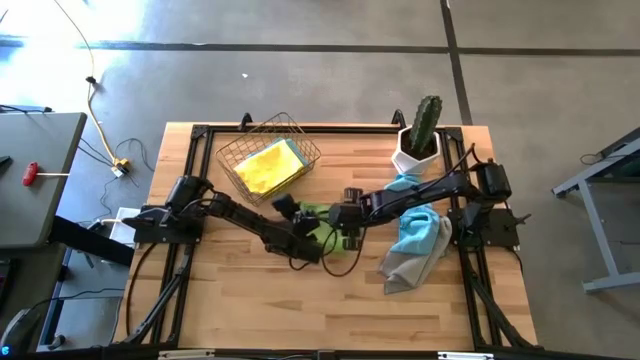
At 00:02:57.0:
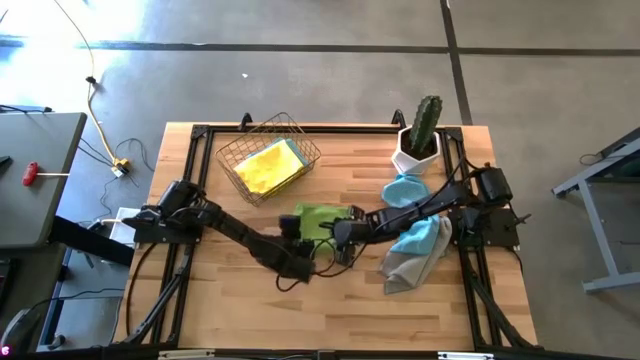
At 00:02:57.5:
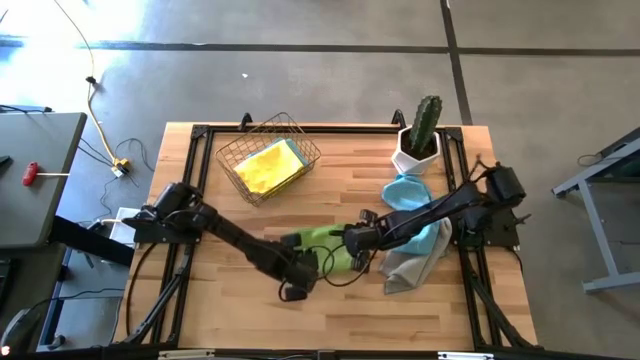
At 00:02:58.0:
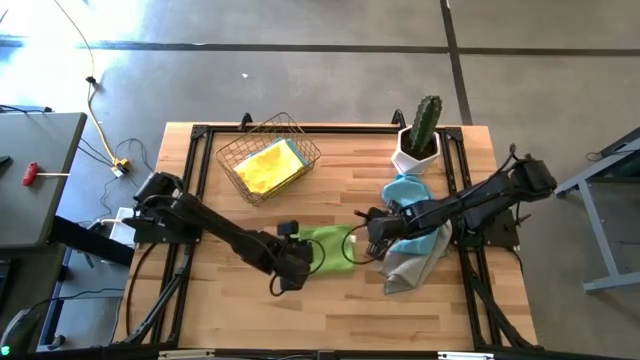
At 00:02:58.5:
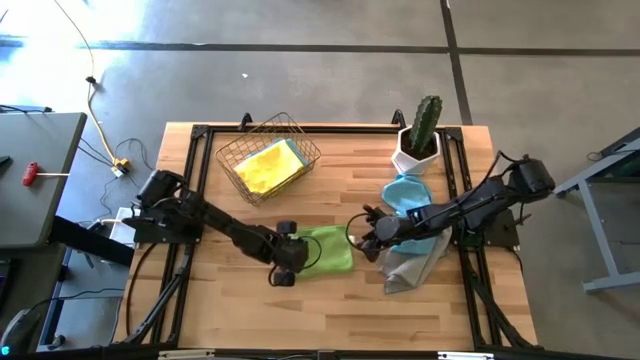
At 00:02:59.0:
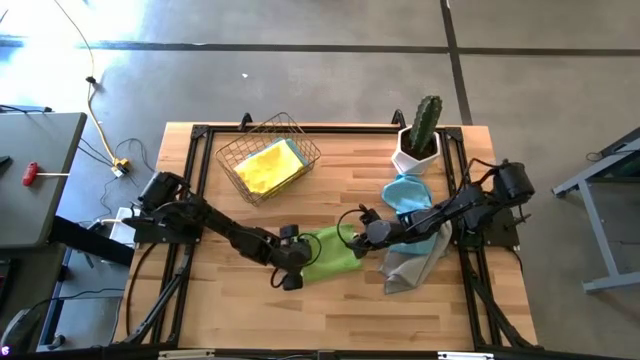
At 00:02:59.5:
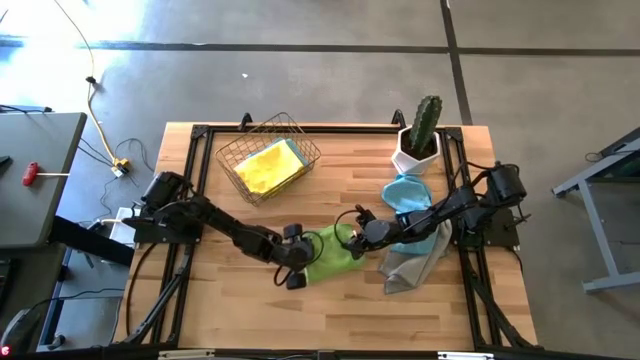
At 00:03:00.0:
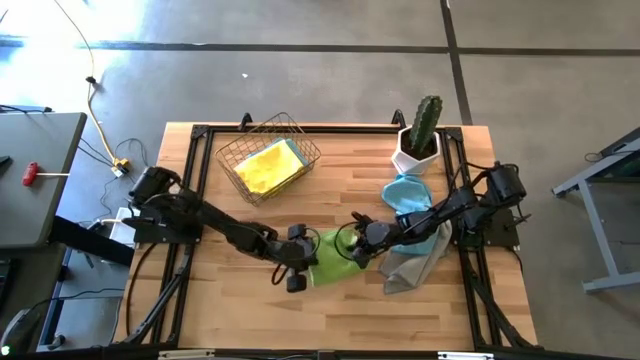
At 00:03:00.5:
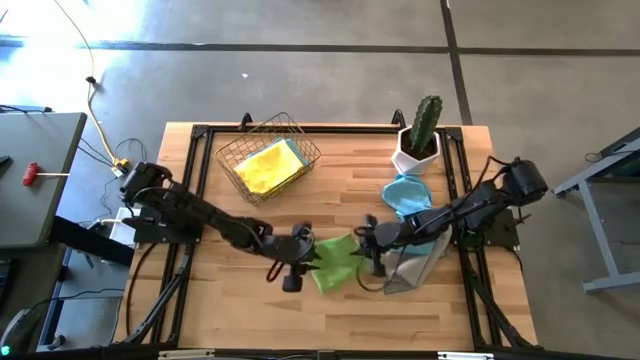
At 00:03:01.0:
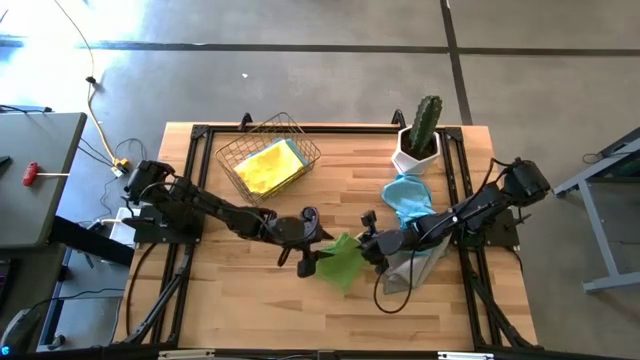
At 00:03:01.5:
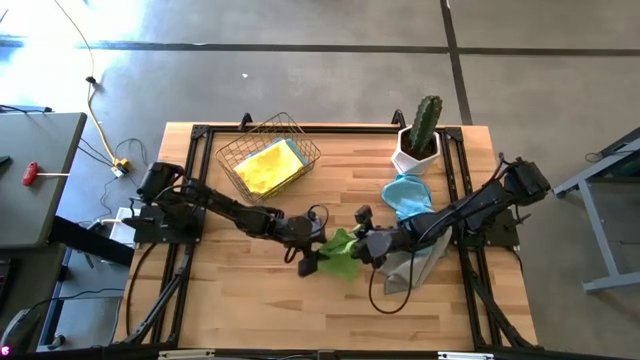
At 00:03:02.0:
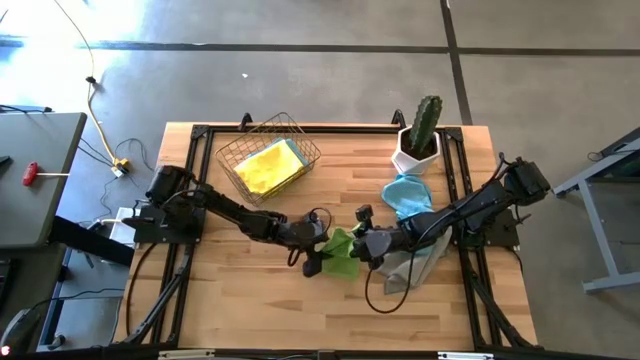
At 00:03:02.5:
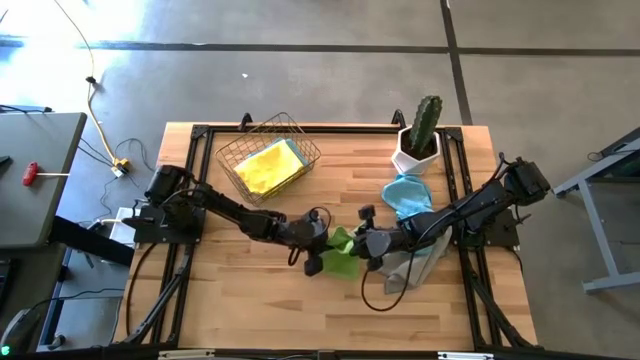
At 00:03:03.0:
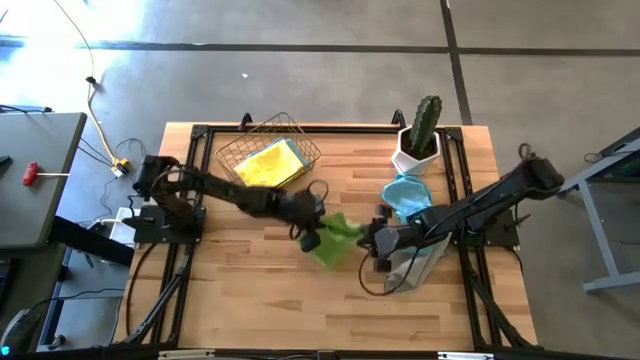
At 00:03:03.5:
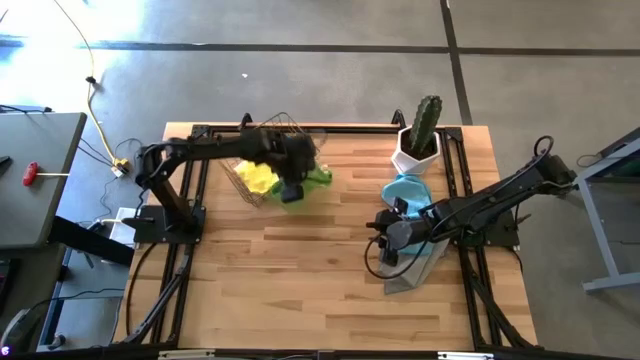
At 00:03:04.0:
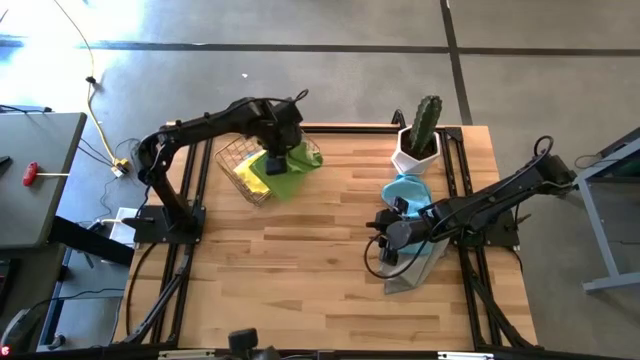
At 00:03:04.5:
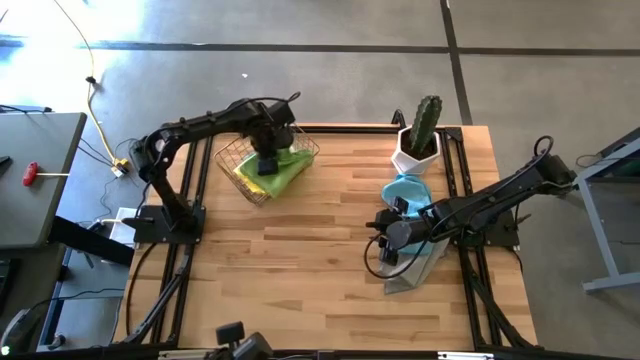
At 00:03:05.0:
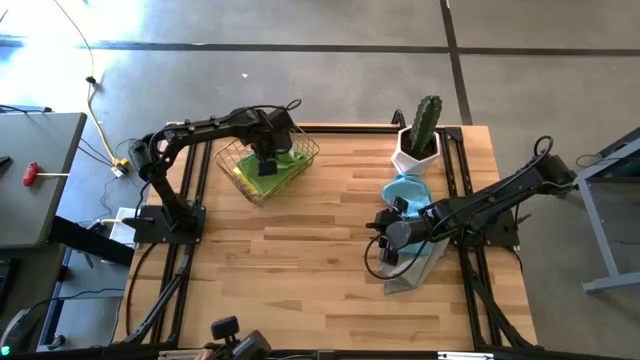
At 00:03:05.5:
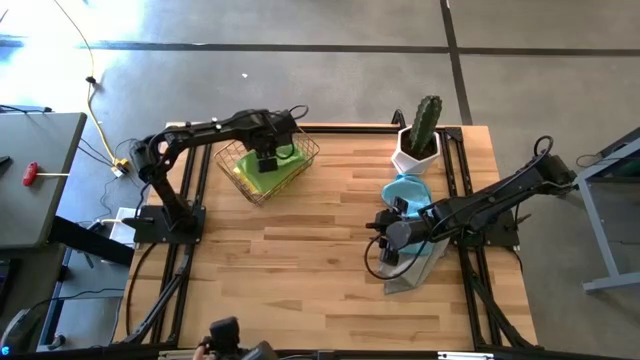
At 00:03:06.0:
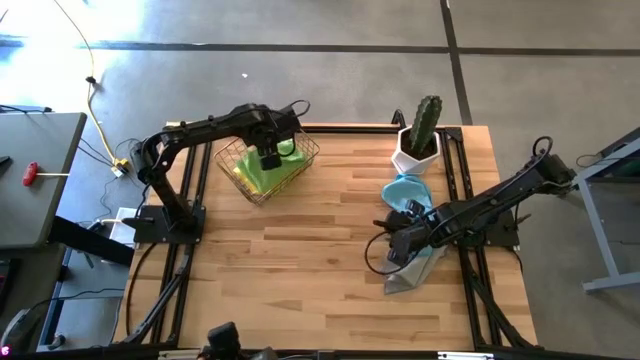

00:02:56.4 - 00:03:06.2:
Task: Fold microfiber towels
Put the folded green microfiber towel into the wire basket

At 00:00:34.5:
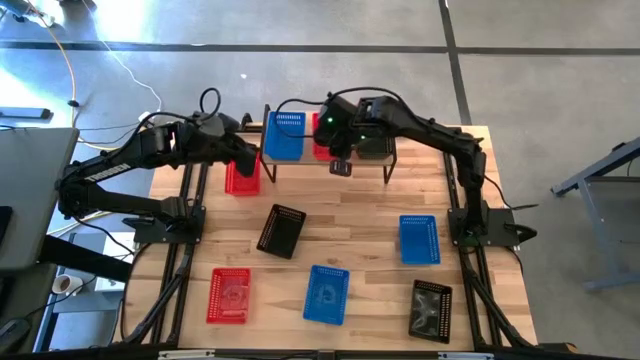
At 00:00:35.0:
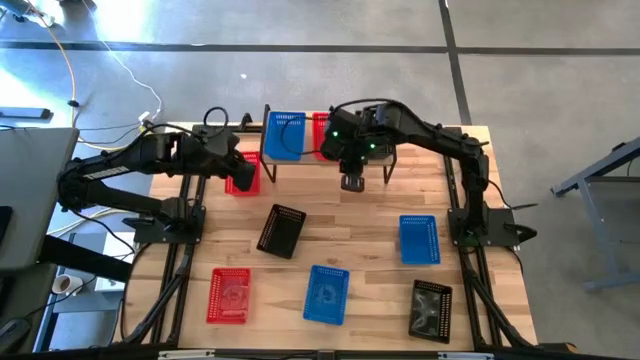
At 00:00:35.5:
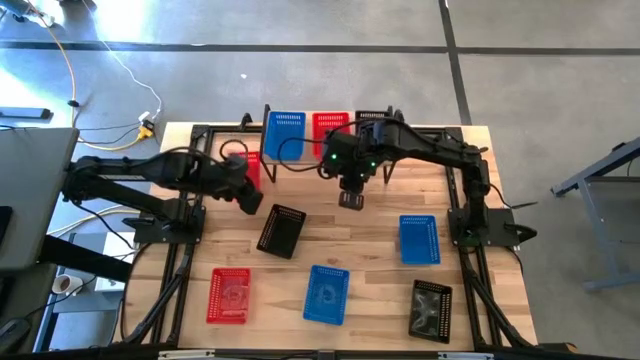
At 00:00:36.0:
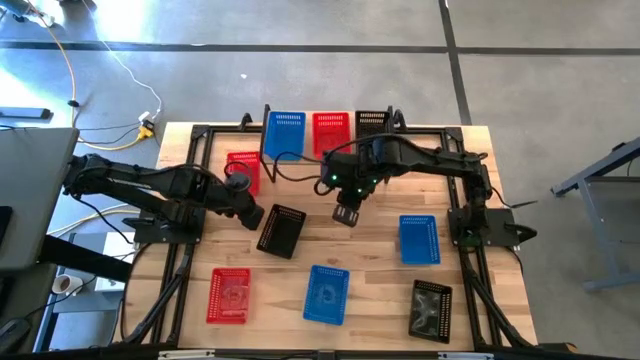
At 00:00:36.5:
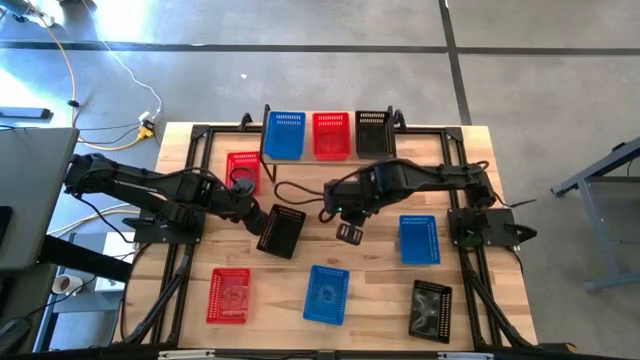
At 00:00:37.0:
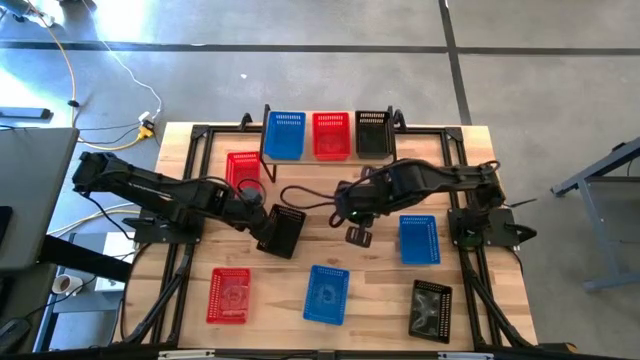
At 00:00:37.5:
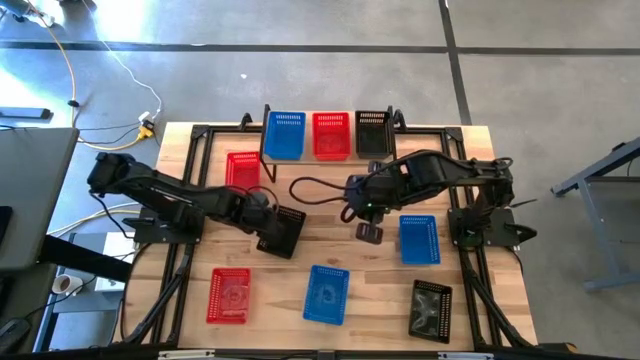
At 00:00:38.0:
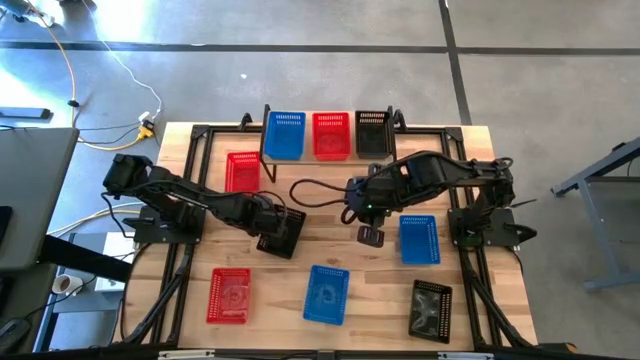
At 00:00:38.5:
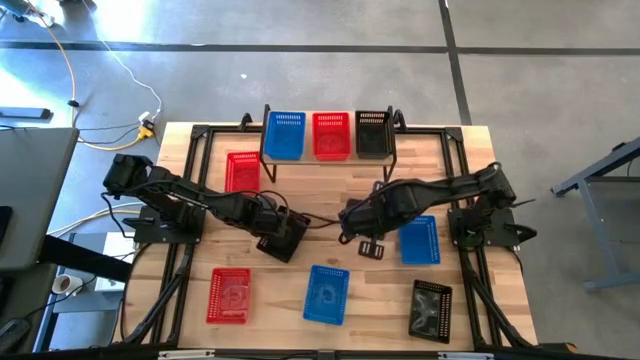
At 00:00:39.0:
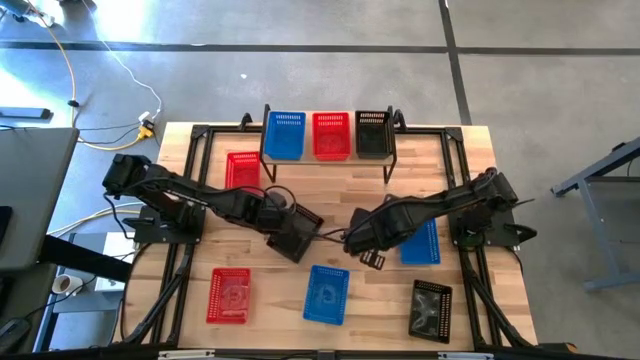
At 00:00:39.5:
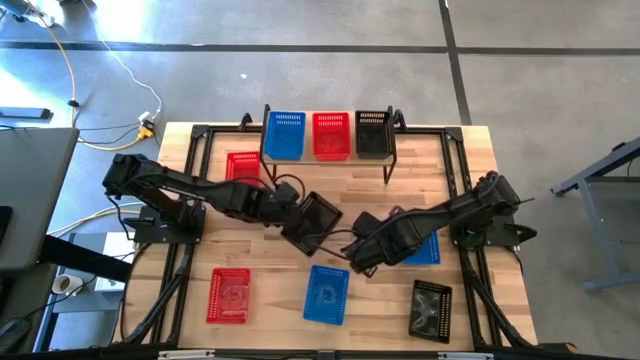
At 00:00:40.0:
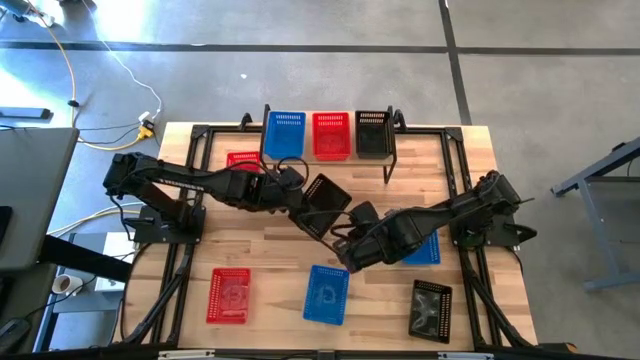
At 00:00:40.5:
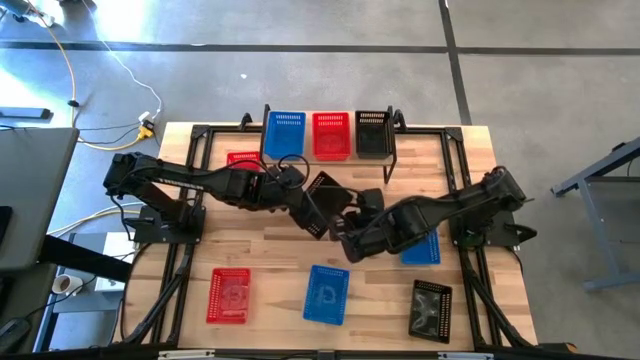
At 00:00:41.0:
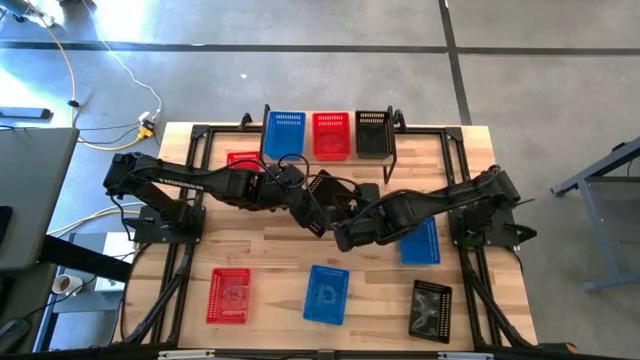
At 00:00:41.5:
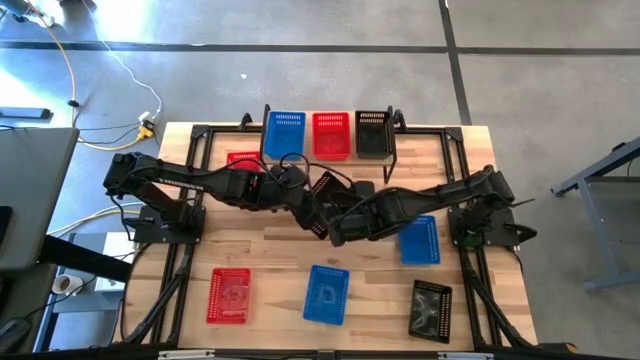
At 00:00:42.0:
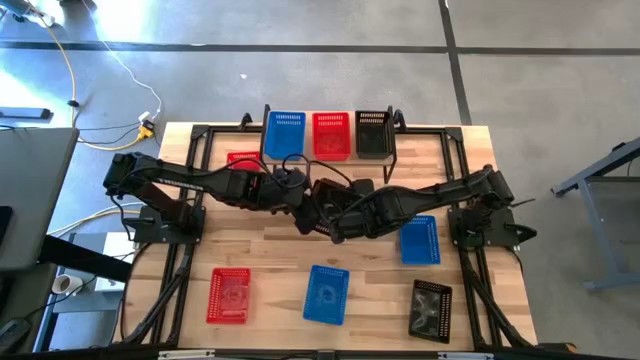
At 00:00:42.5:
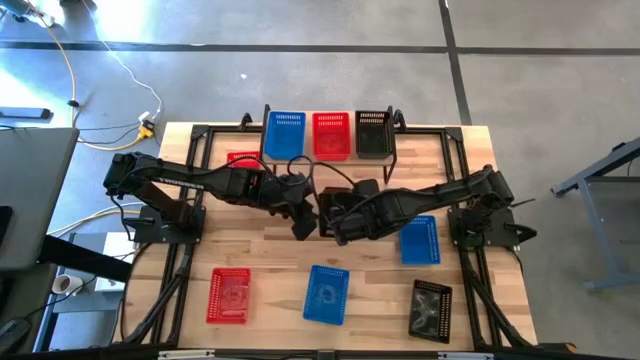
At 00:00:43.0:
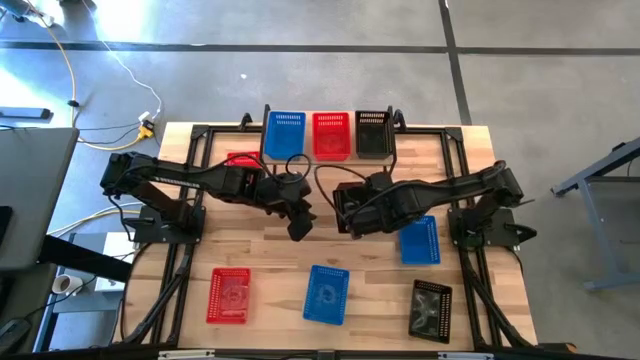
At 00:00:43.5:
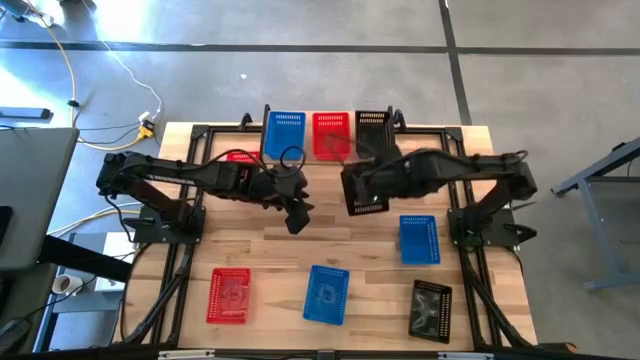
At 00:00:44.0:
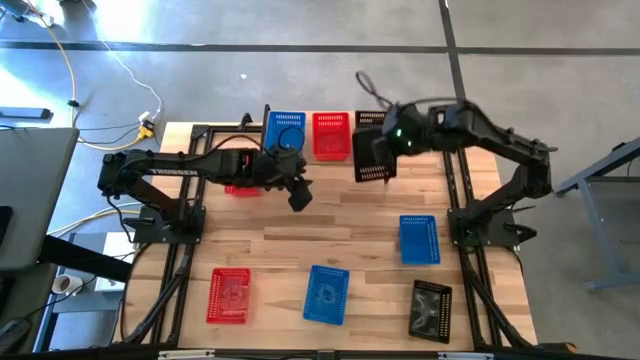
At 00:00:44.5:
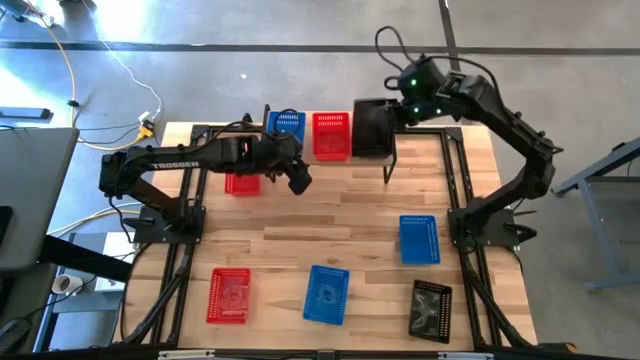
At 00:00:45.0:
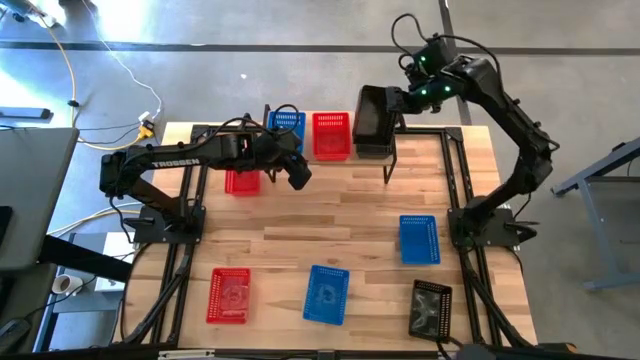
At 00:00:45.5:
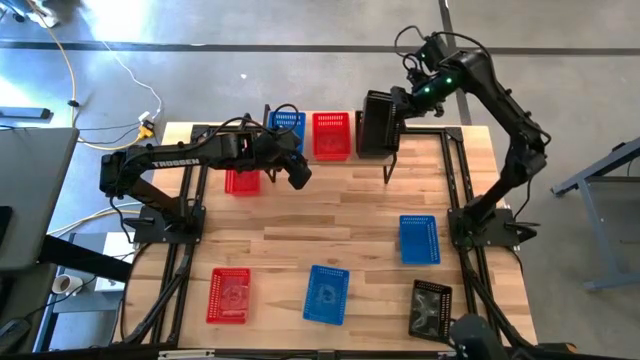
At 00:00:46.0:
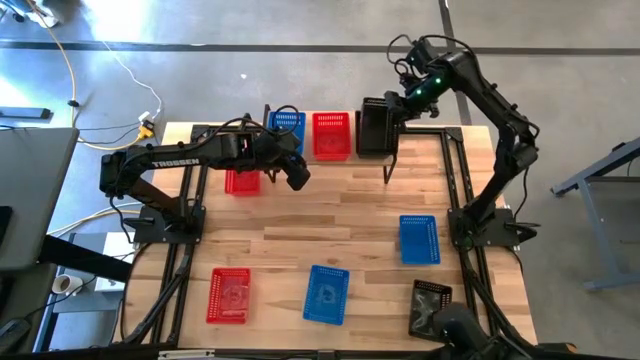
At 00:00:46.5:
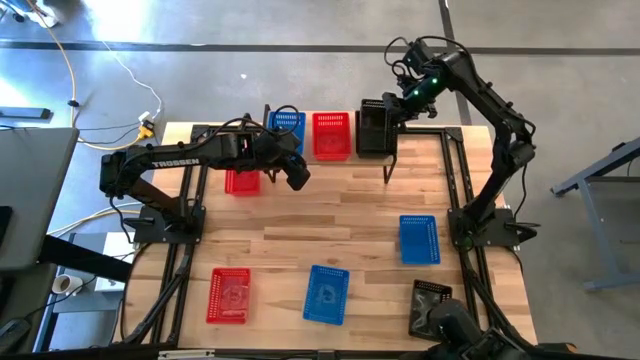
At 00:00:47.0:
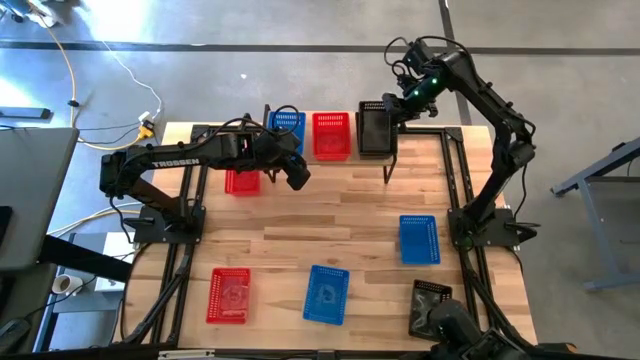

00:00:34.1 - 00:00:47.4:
Task: Stack baskets on shelf by color
Stack the left black basket into the black basket on the shelf
